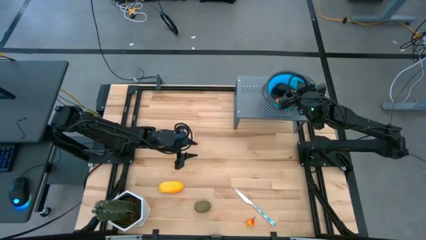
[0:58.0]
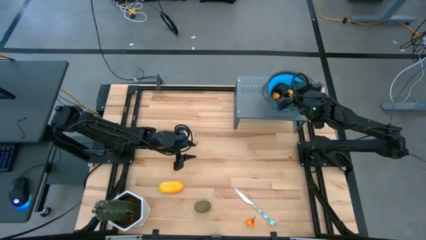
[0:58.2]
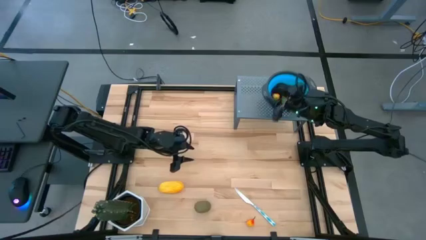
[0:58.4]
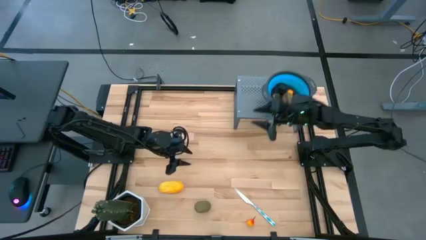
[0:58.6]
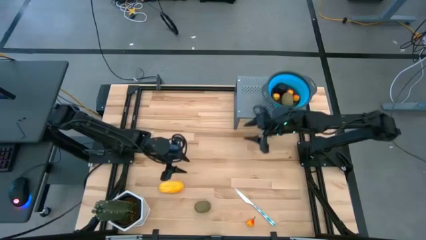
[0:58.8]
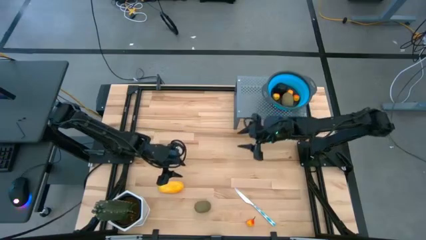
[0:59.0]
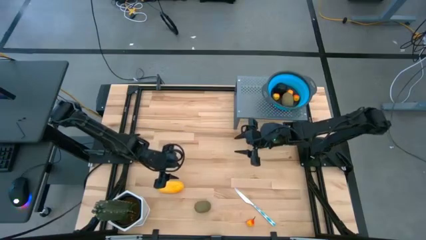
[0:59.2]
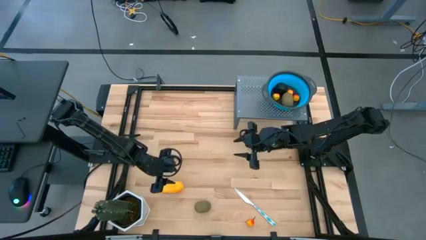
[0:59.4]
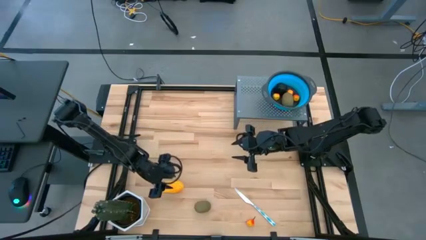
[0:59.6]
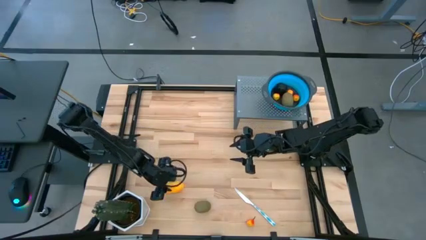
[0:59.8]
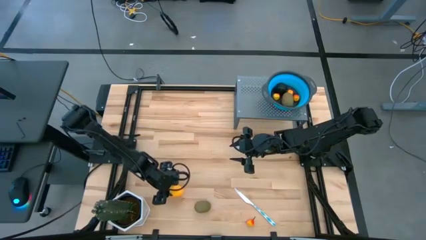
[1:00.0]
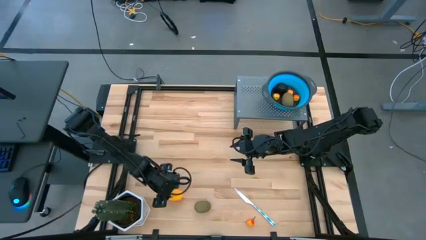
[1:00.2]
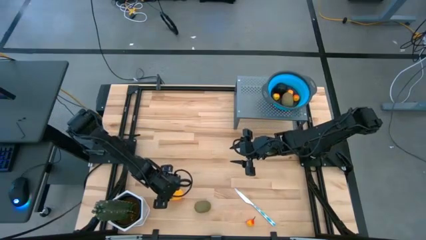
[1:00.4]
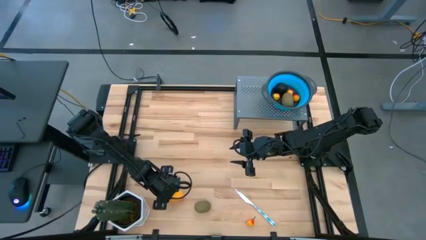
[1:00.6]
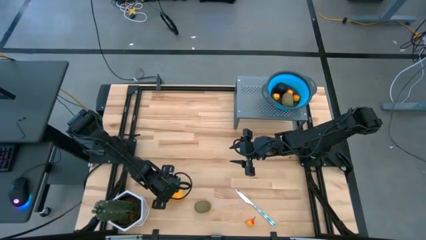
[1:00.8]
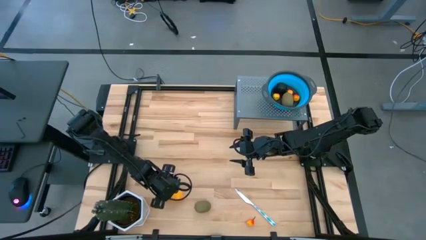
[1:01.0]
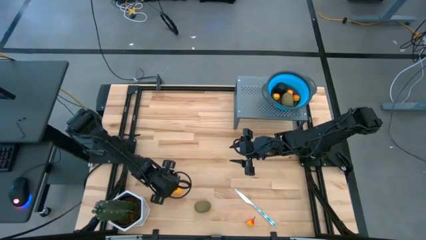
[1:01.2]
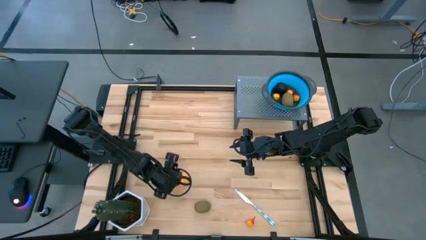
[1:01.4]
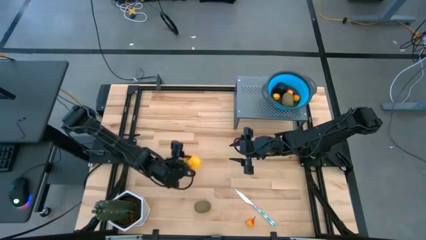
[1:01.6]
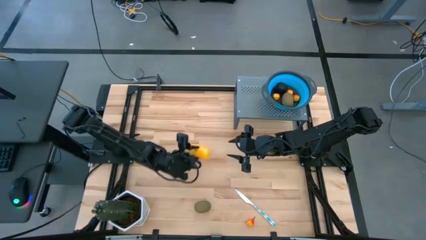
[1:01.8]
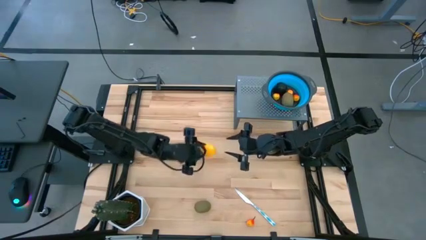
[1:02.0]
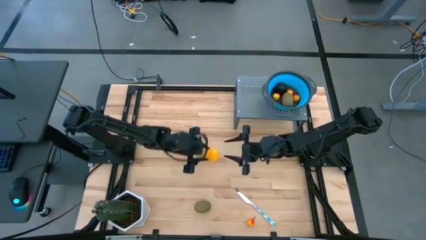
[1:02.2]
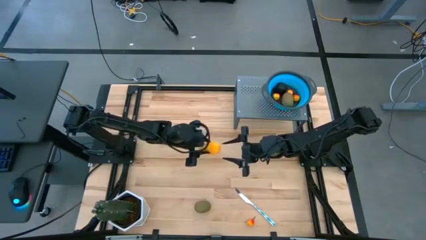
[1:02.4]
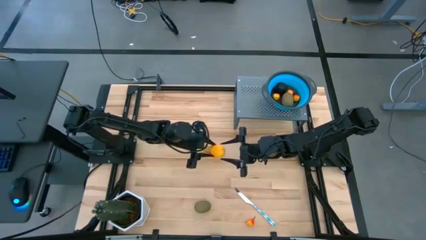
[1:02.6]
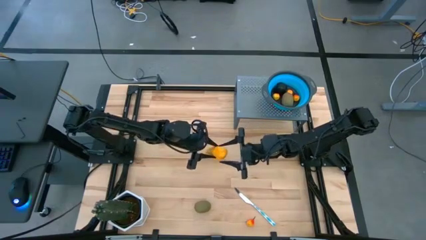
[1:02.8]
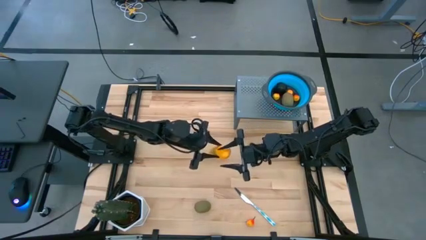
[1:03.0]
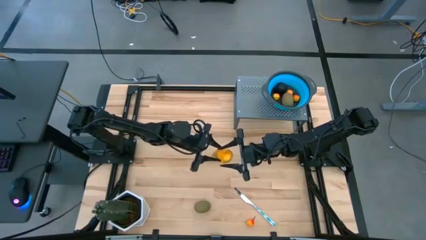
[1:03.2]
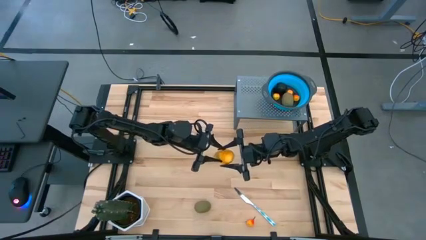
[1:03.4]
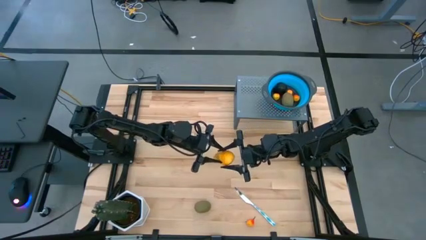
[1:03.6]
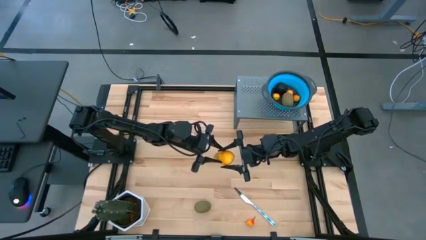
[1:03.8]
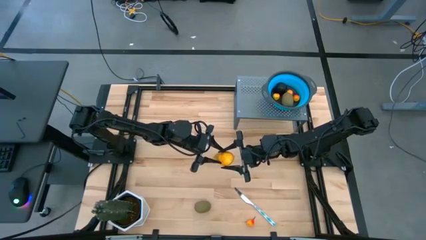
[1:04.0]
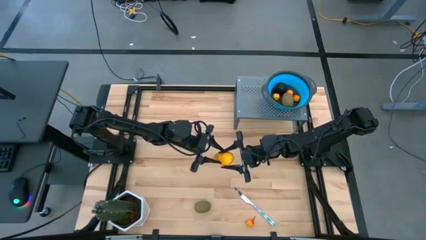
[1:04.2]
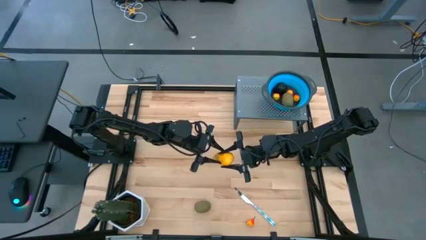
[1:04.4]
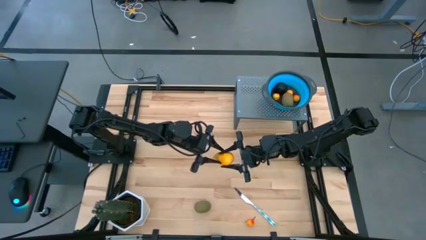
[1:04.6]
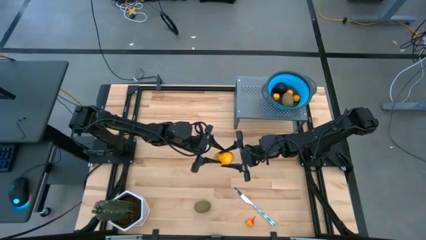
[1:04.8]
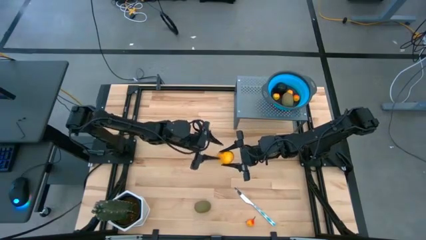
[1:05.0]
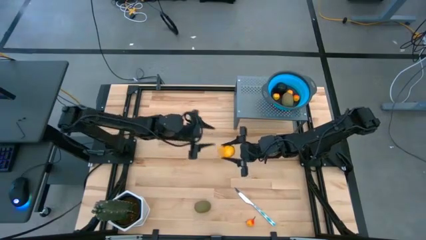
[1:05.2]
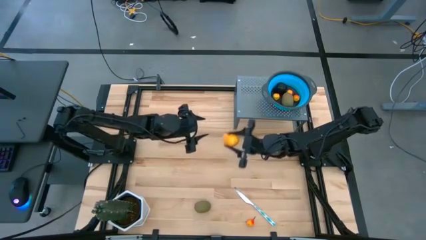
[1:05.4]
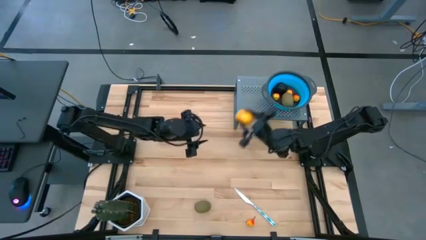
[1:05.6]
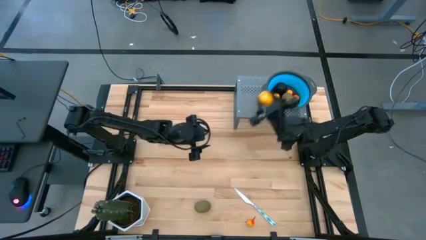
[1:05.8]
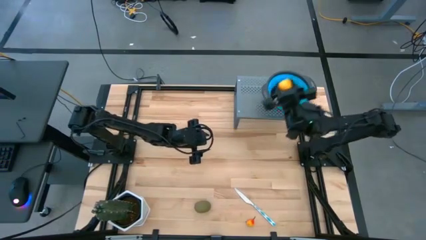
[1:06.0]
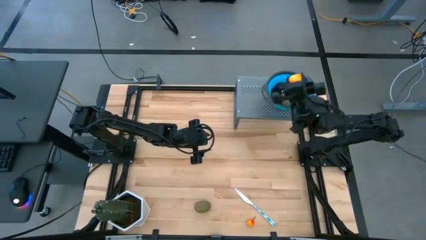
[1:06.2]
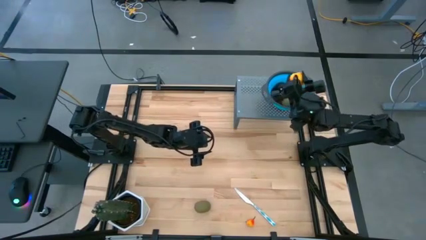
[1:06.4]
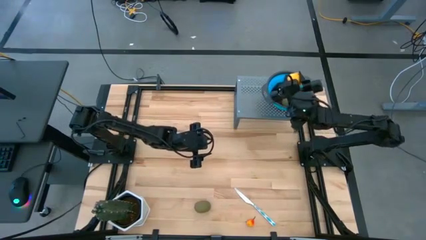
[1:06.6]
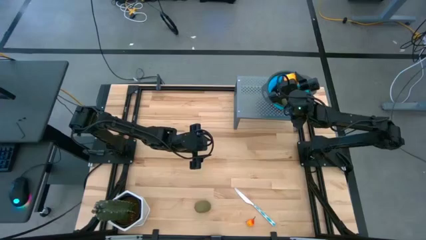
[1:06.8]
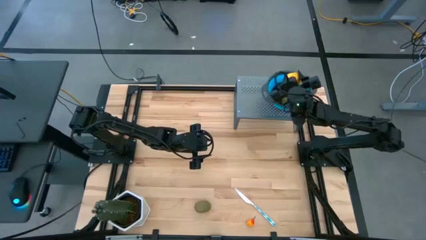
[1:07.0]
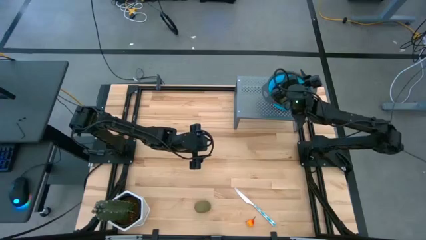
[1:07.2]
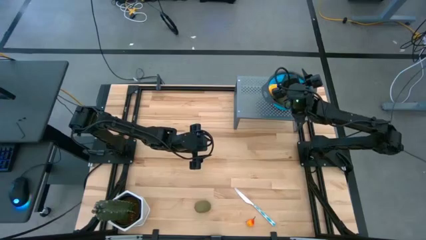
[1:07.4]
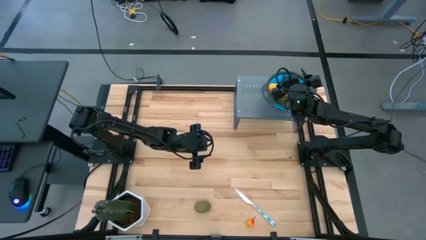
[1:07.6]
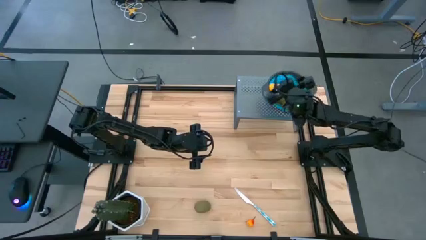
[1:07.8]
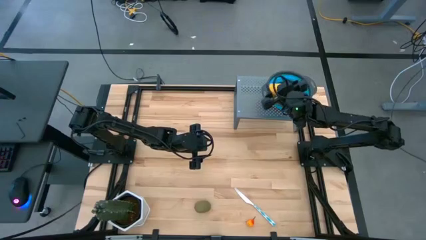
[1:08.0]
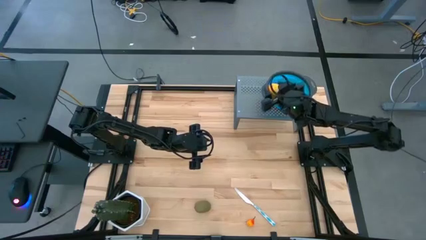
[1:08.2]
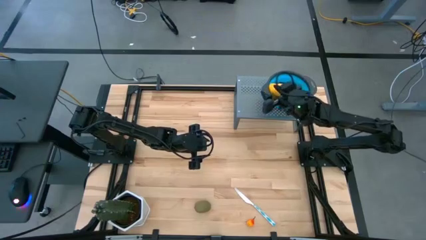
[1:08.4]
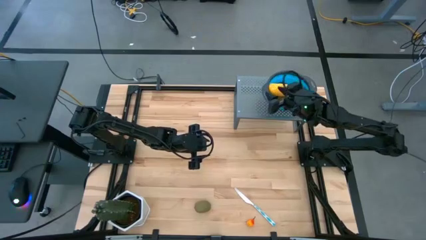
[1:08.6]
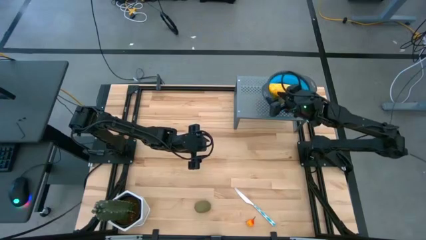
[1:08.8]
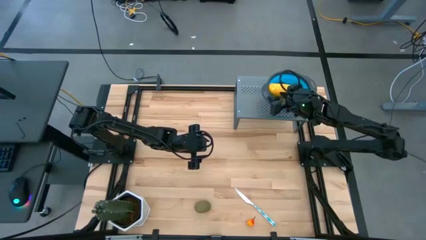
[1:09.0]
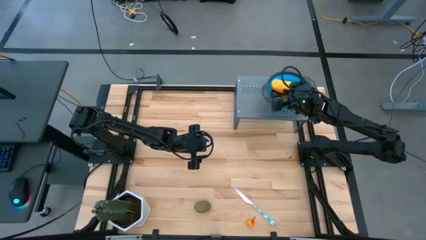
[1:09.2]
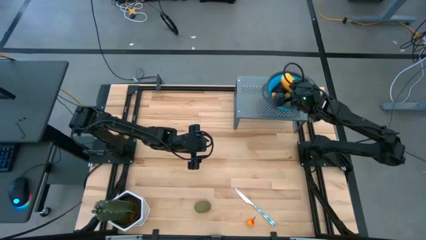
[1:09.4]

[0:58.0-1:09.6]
Task: Pick & Place Fruit
Put the yellow mango into the blue strainer bowl on the shelf
